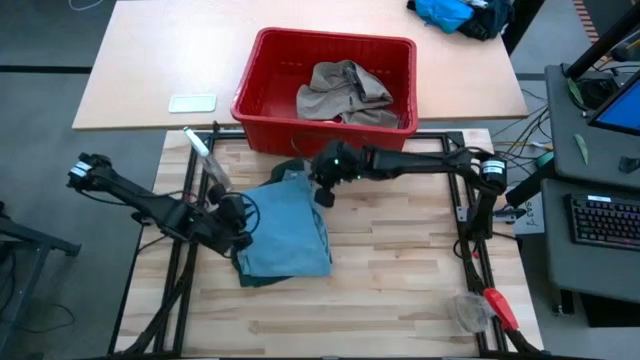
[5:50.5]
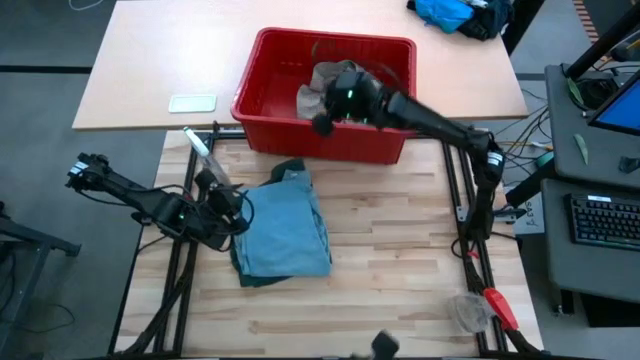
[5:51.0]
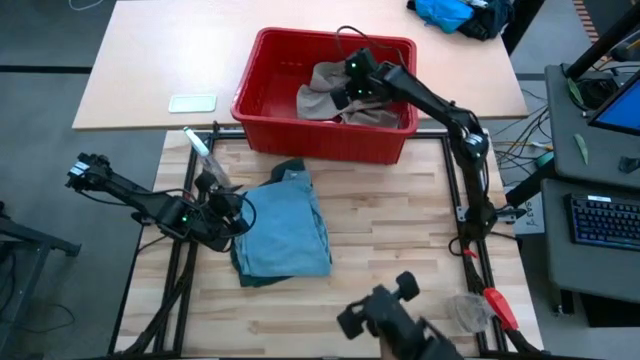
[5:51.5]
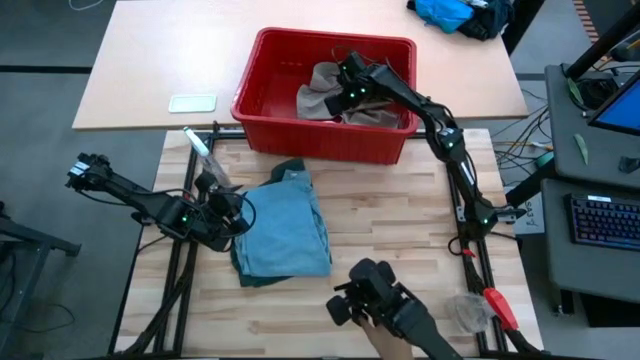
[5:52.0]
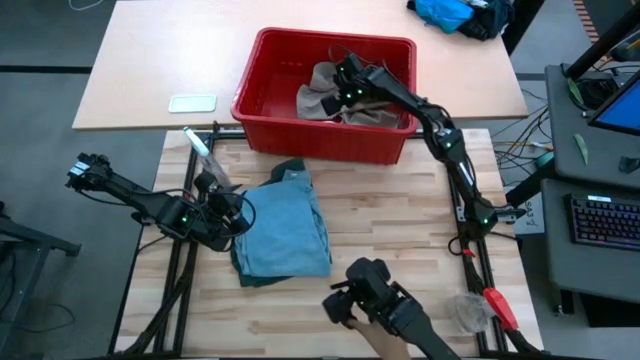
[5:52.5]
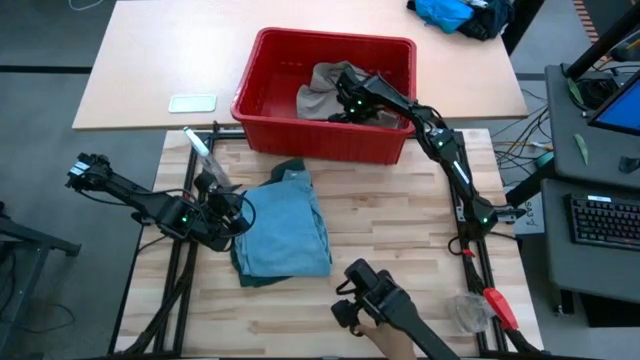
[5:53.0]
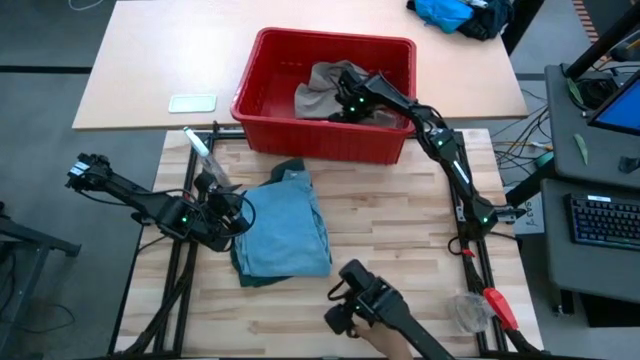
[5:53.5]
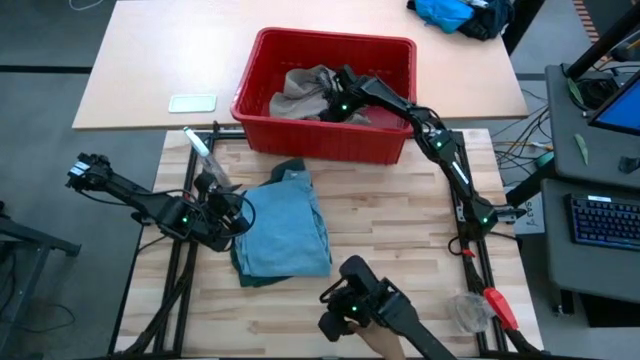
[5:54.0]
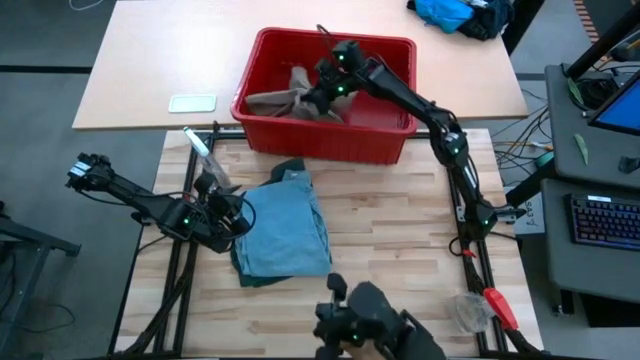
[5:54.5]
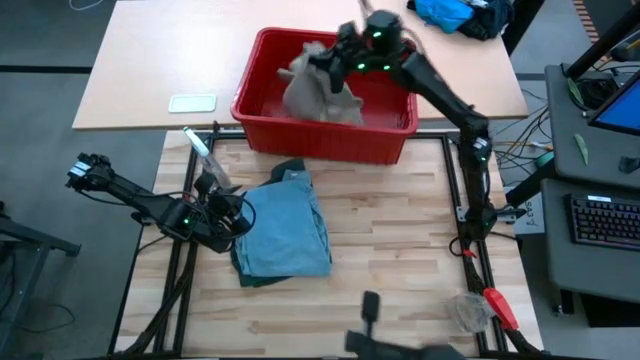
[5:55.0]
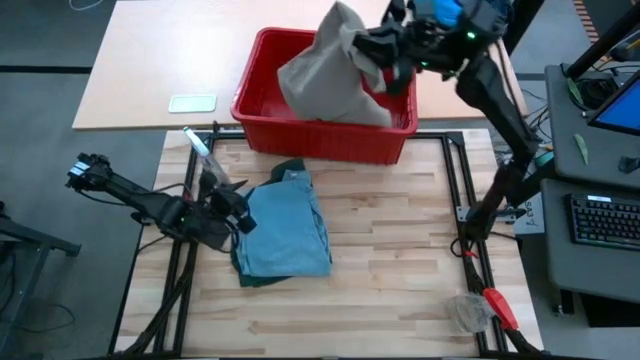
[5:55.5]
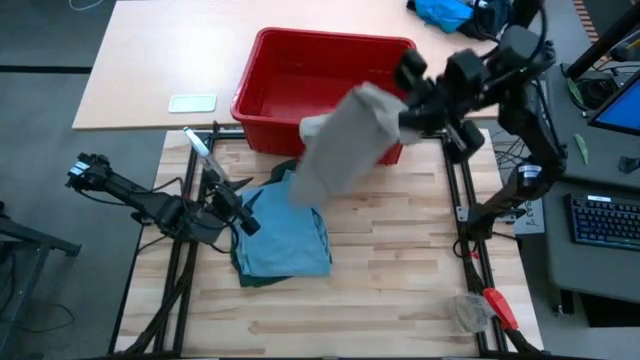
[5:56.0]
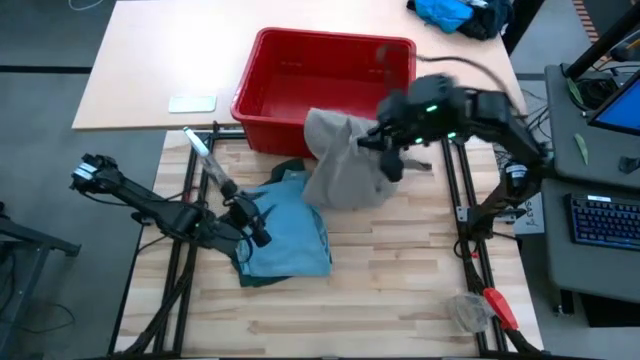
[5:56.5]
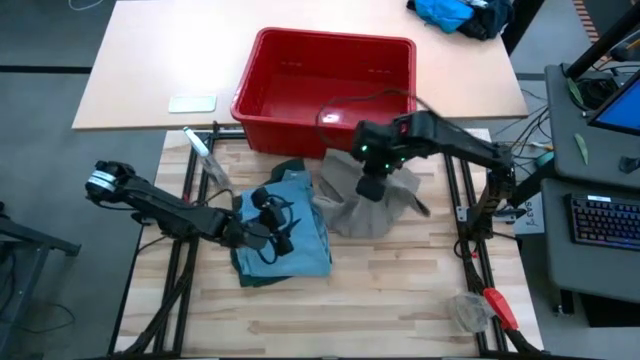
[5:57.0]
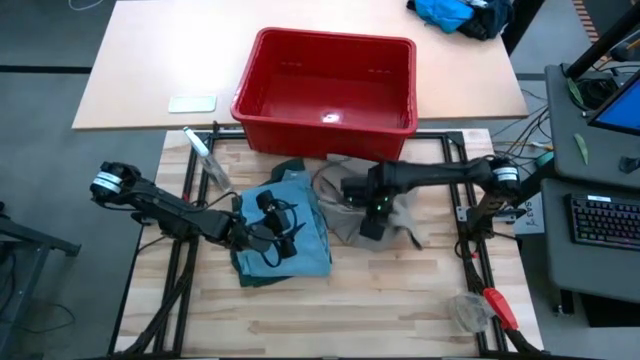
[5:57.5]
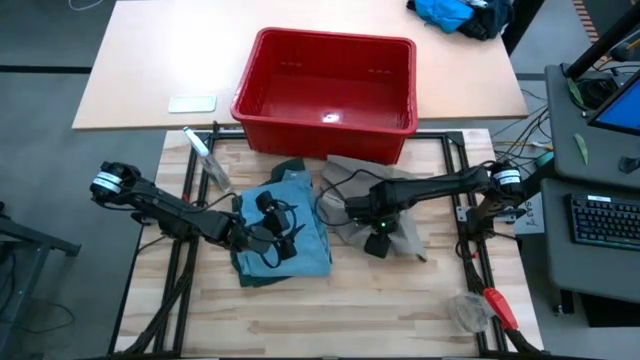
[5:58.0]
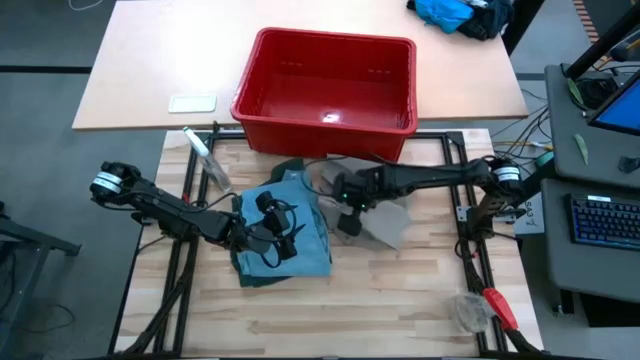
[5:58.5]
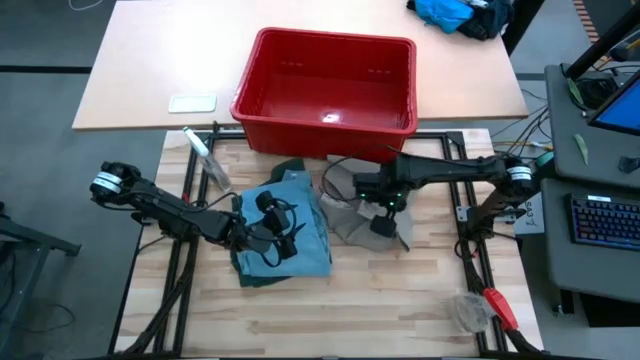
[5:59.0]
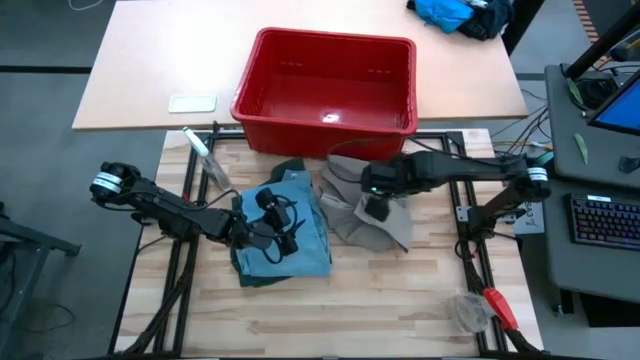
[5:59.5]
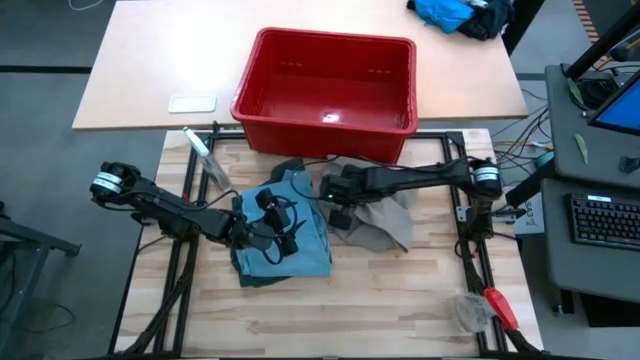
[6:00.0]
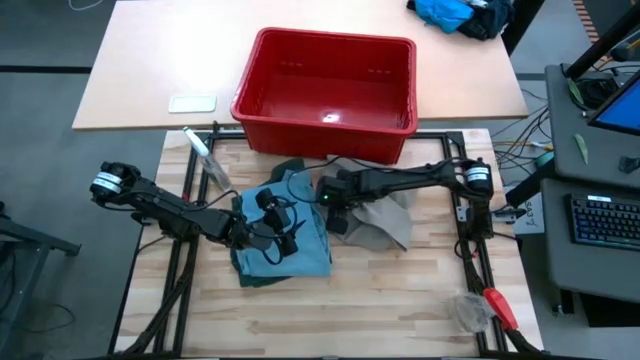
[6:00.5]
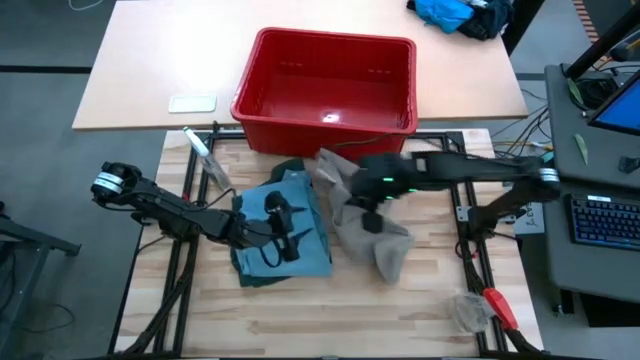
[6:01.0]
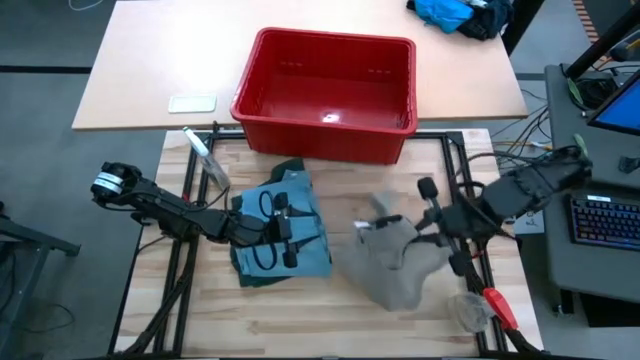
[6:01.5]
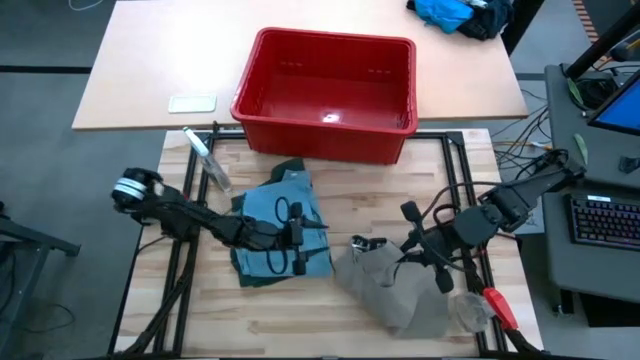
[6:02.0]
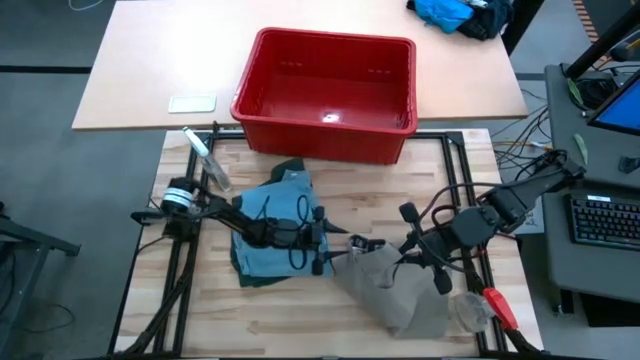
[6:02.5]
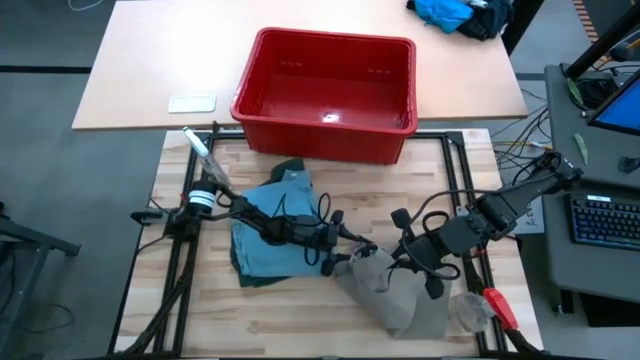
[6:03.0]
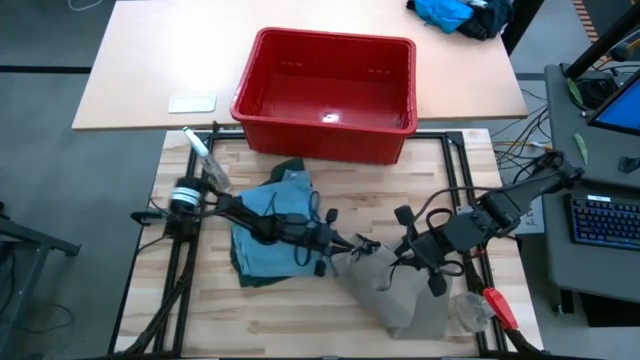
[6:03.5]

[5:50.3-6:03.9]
Task: Fold Laundry from Bin
Fold the light brown shorts

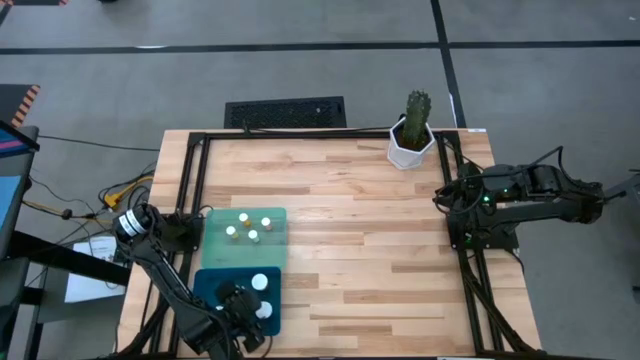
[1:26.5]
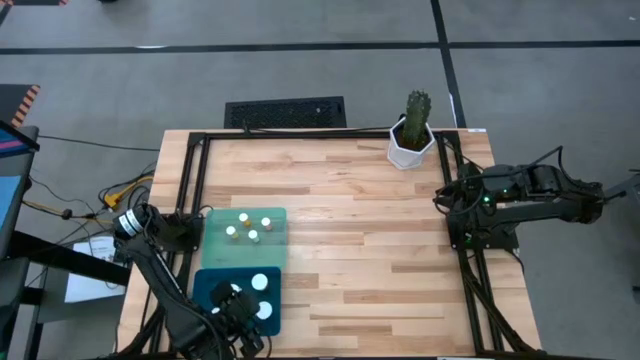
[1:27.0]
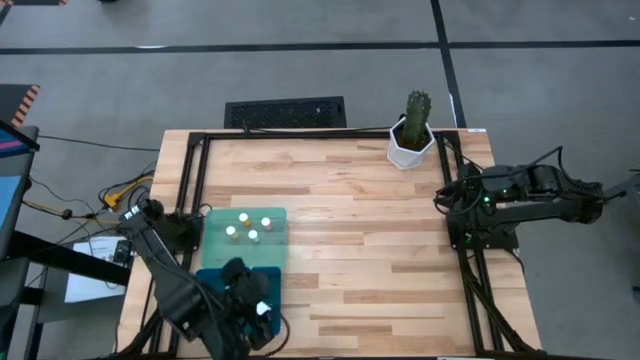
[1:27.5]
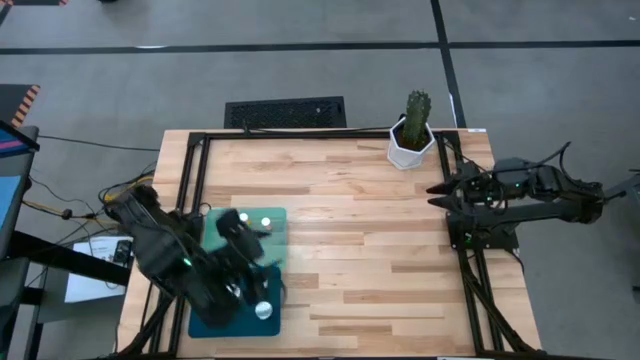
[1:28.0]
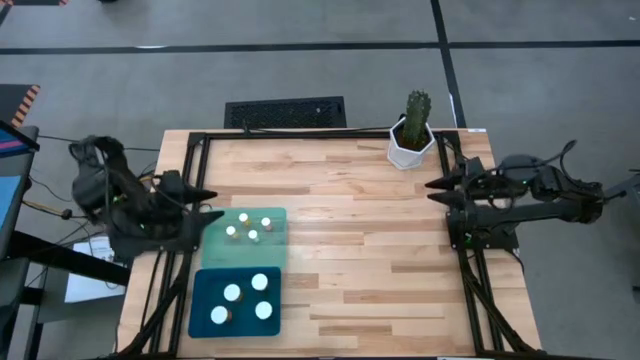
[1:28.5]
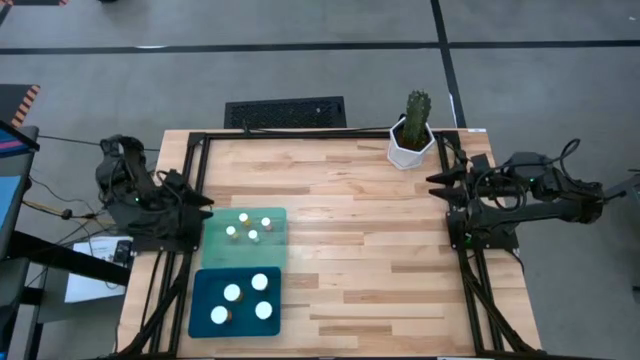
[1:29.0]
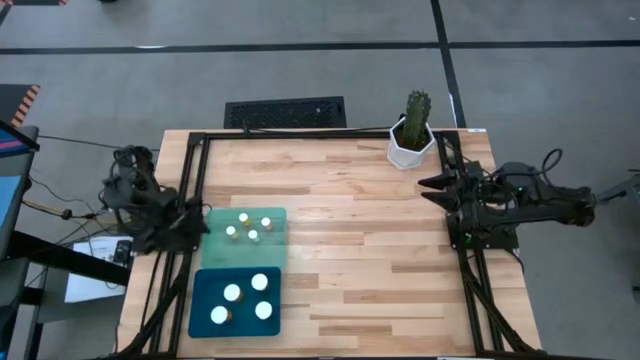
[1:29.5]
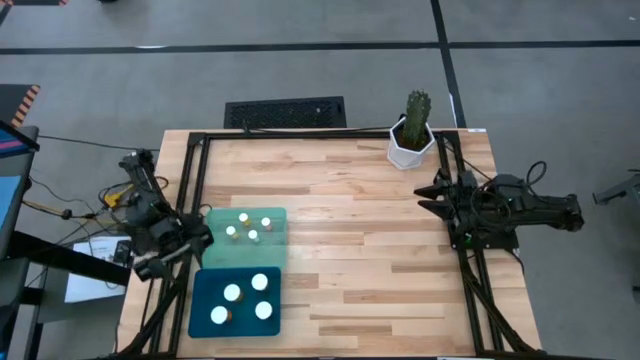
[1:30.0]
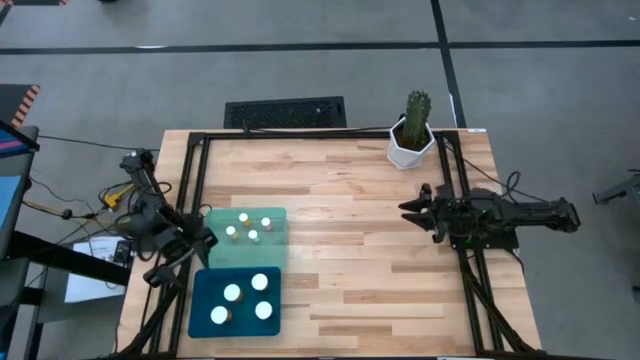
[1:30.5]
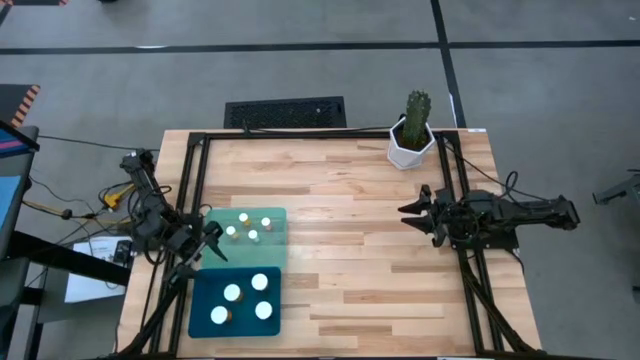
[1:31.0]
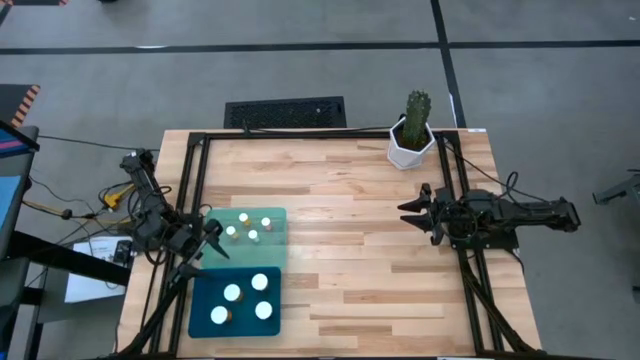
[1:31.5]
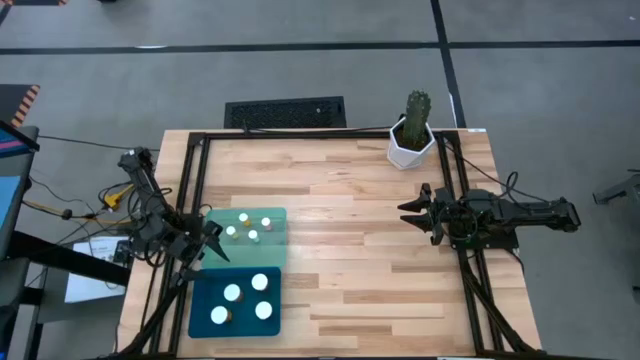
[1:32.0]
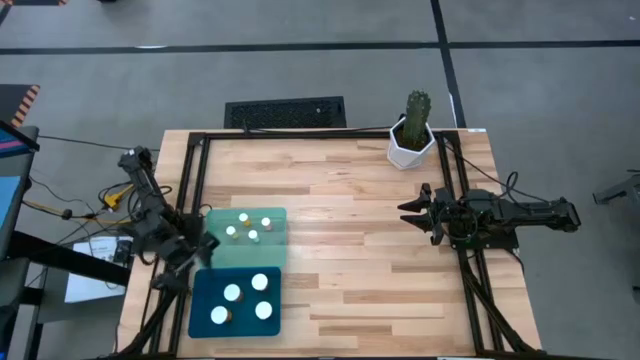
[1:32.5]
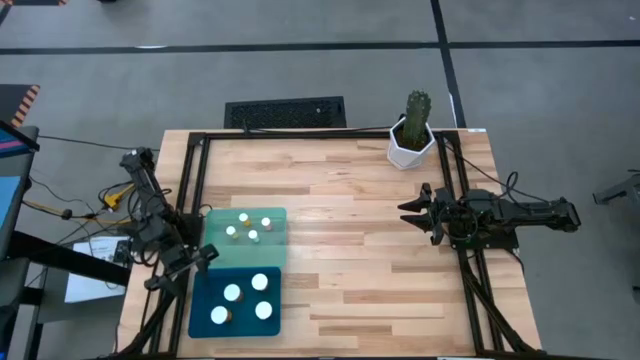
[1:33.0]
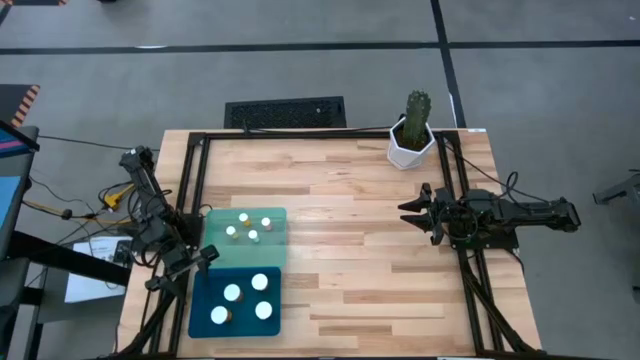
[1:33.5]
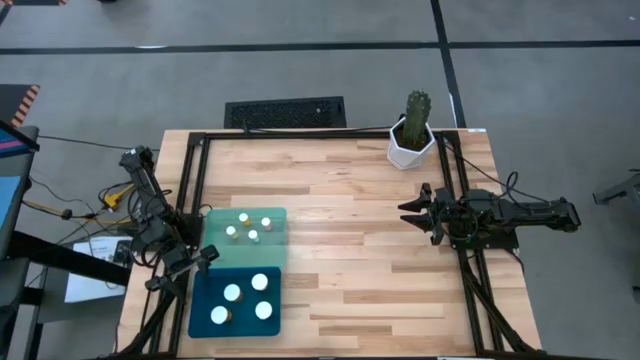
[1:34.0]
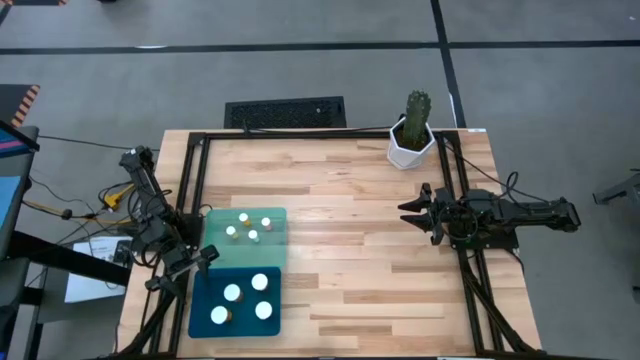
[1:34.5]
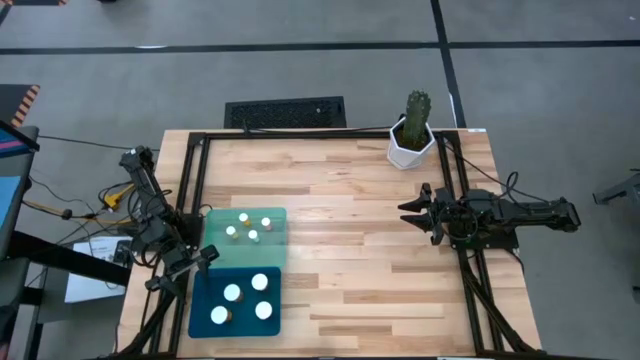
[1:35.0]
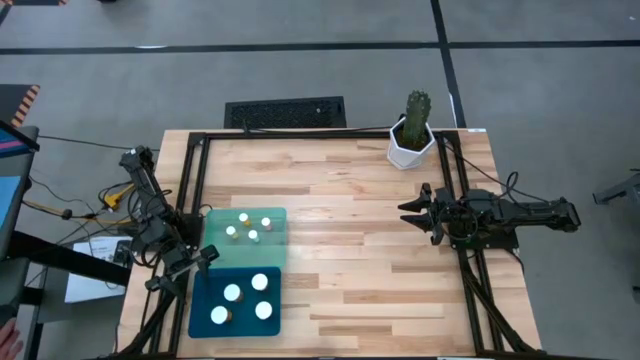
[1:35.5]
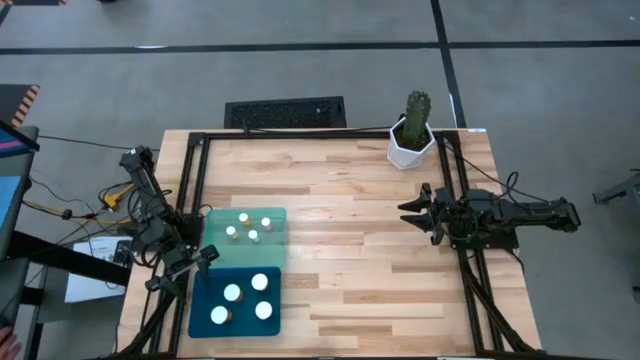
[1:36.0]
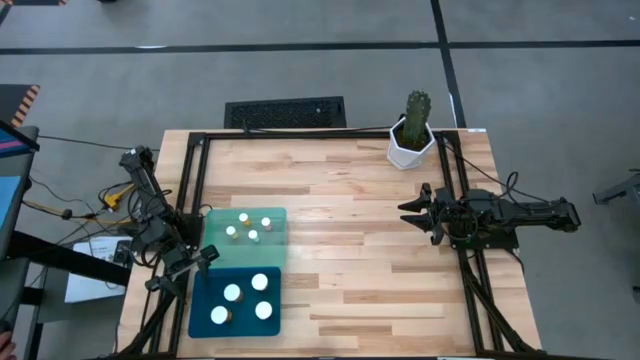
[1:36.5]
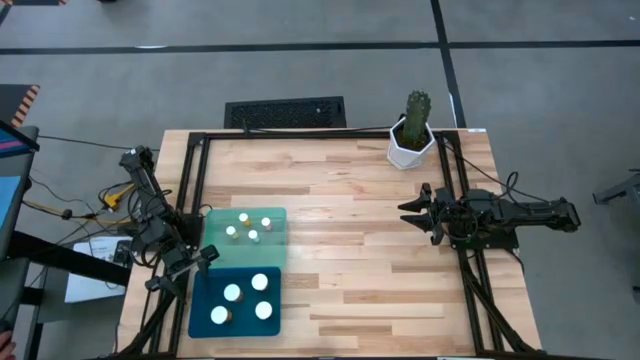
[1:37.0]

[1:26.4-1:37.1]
Task: Pick and place medicine bottles into bin by pill shape (circle, oval)
Return to Home Position
